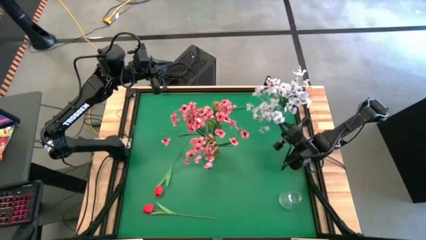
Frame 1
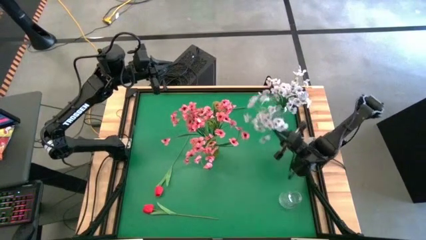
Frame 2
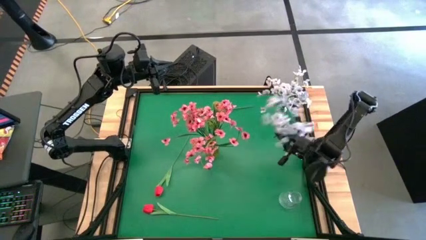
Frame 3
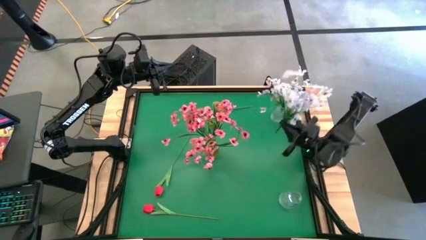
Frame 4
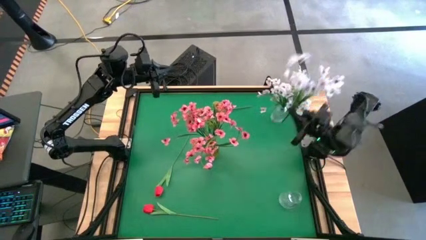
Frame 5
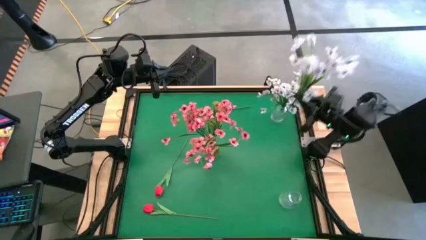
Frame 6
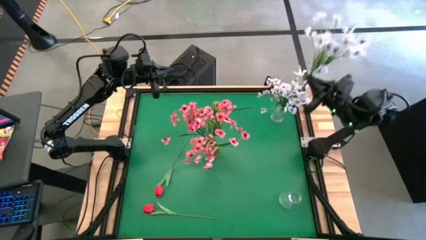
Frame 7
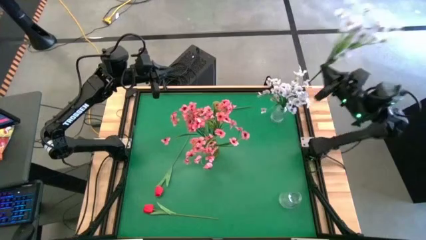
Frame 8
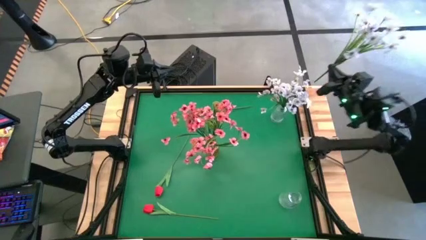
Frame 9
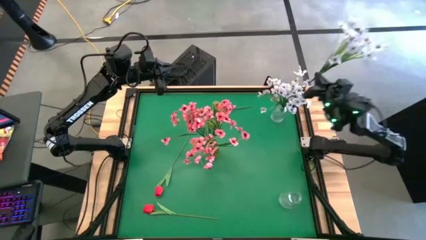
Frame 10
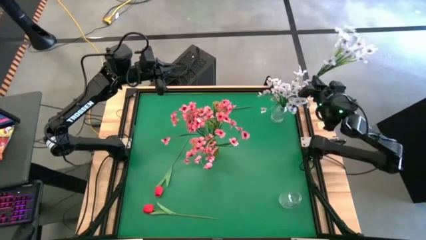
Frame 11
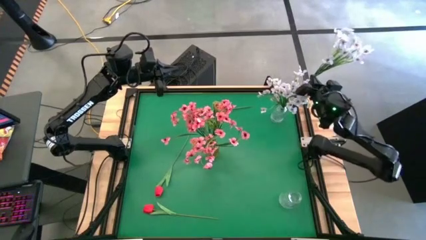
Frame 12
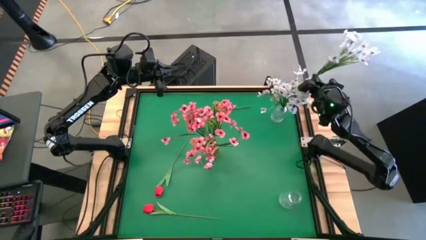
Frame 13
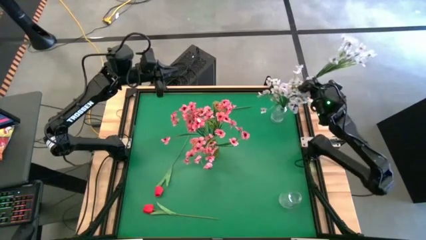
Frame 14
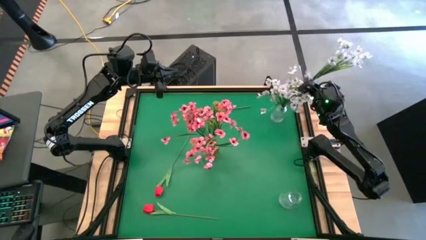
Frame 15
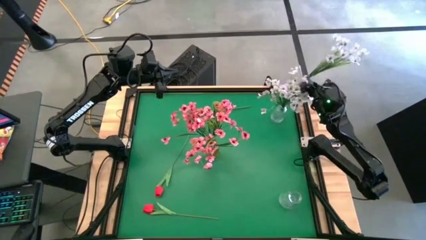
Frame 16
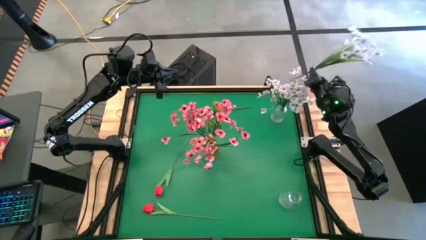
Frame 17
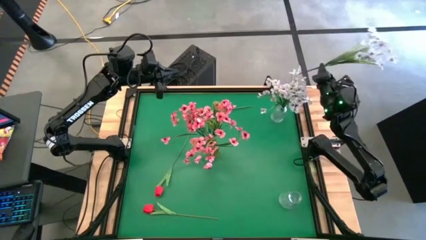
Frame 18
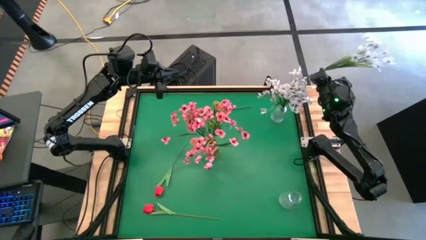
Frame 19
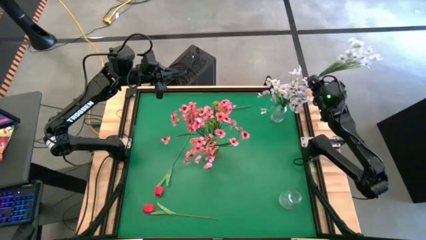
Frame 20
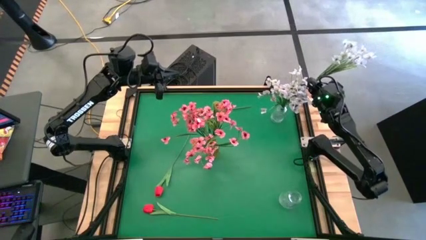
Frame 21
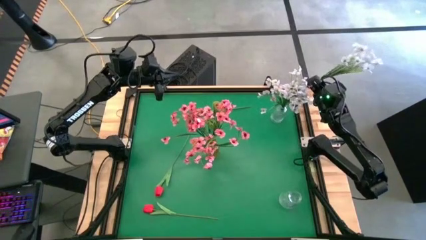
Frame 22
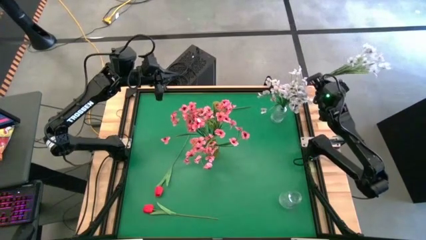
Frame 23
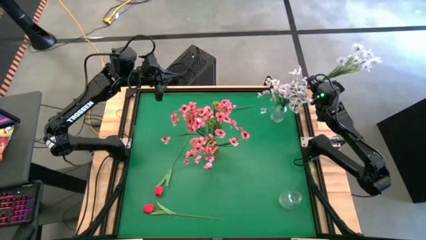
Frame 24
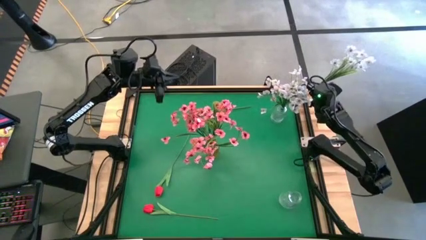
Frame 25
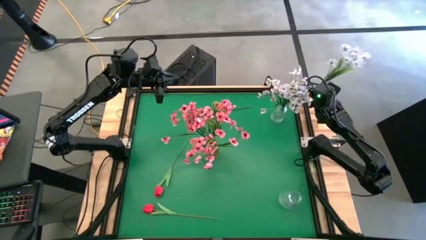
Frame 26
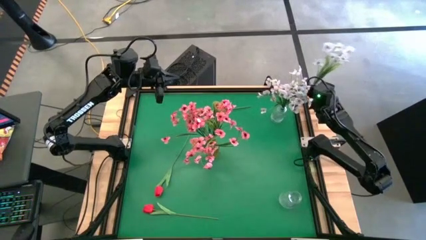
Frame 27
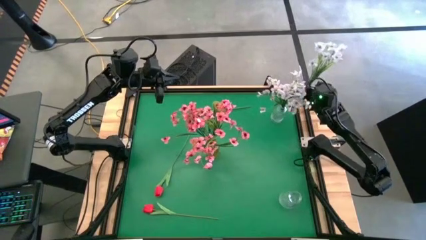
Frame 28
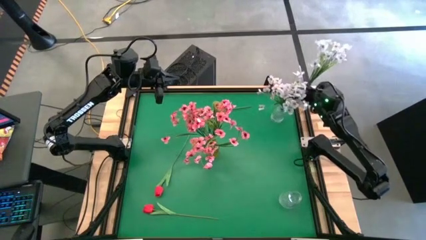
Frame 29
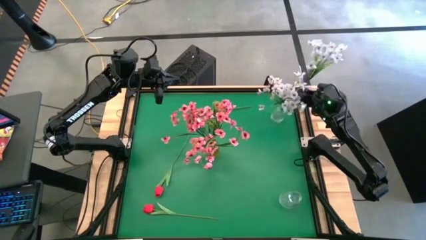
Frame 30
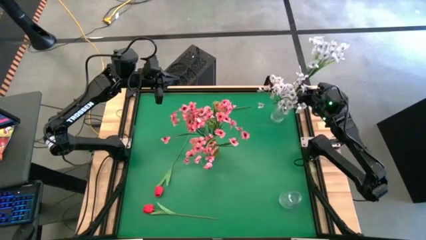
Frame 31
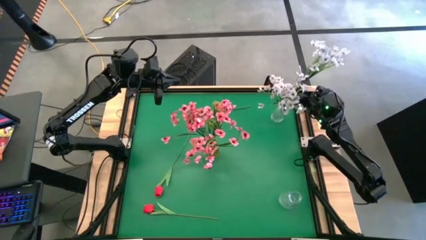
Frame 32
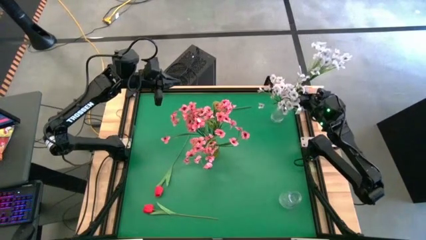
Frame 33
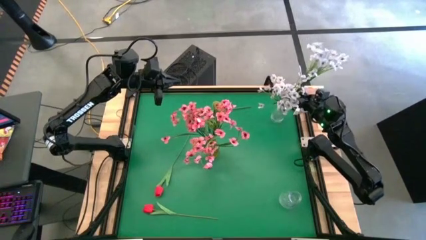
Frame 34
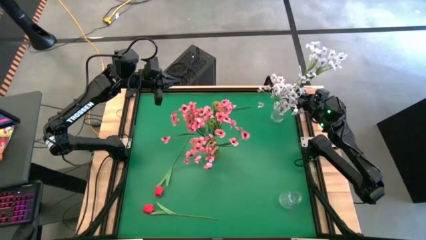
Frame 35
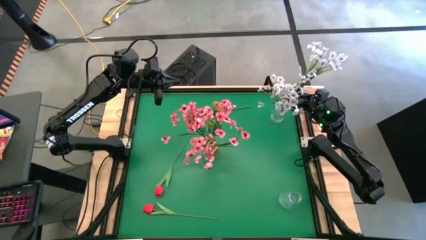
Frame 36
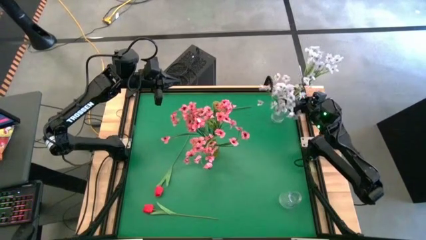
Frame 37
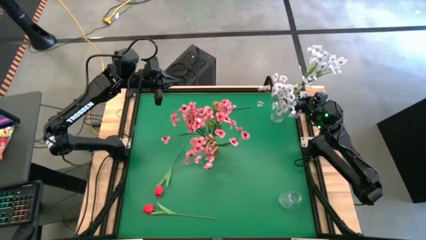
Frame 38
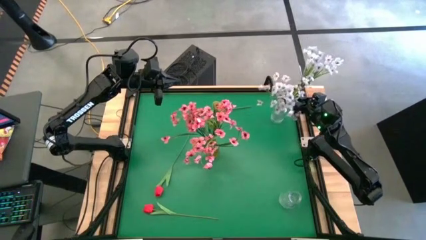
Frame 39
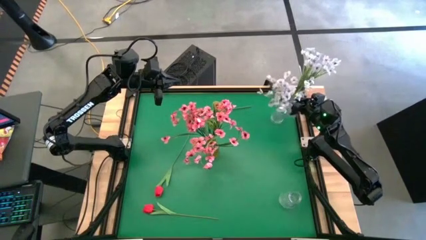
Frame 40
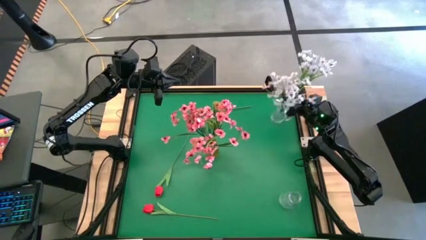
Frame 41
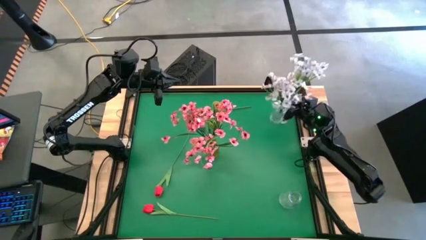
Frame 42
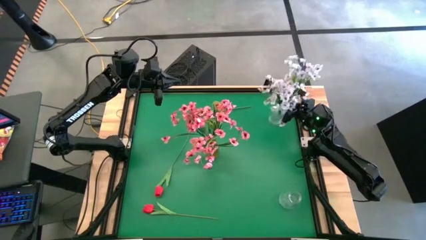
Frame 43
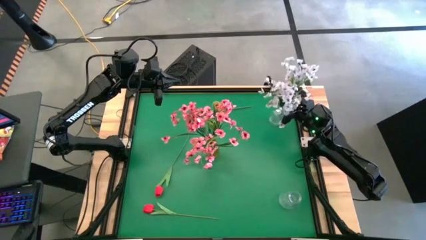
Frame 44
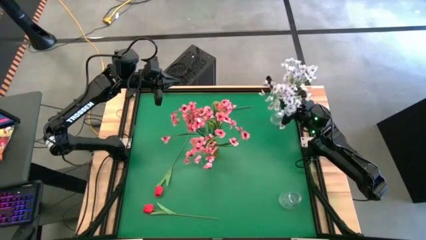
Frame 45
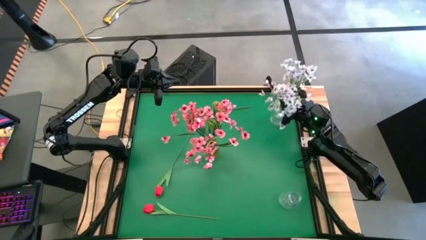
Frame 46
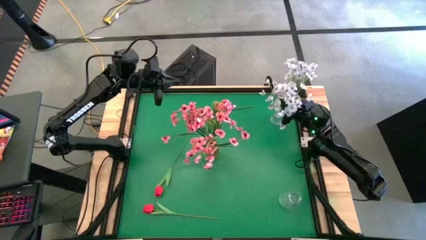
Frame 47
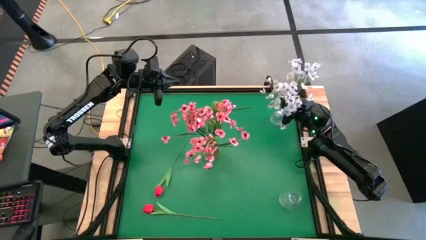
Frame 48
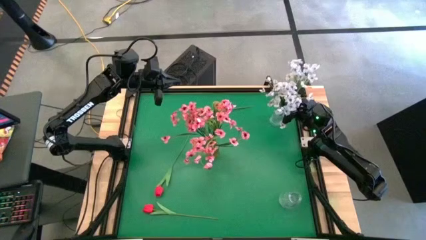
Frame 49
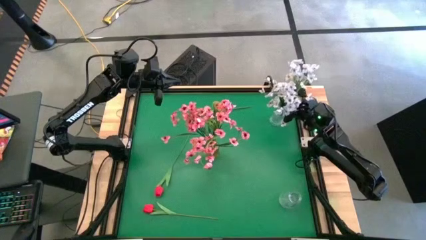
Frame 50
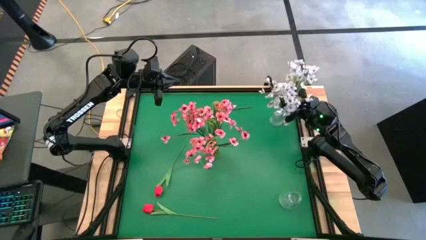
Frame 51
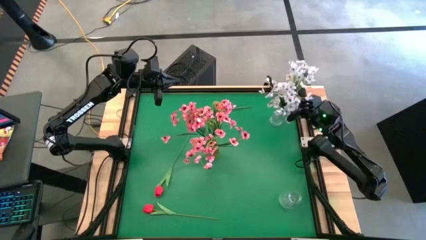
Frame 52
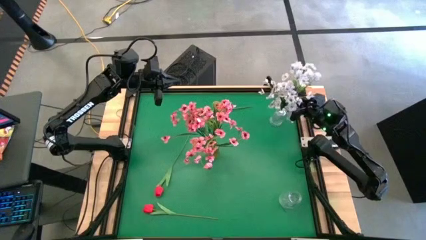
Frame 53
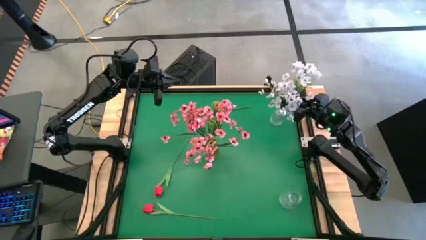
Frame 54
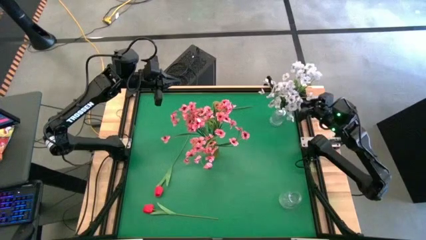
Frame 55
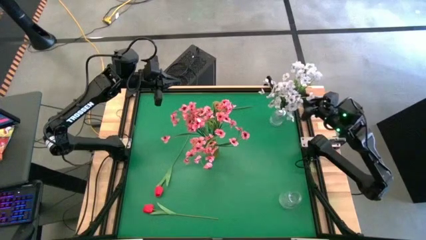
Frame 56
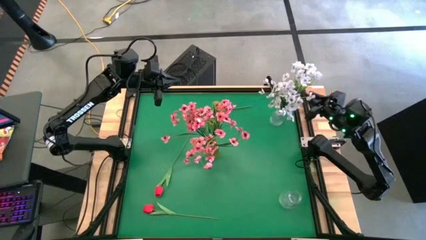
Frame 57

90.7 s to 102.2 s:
Task: Sort flowers into vase by color
Put the white flowers into the top transparent vase

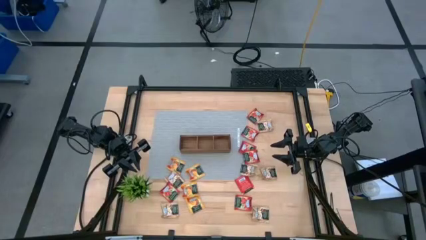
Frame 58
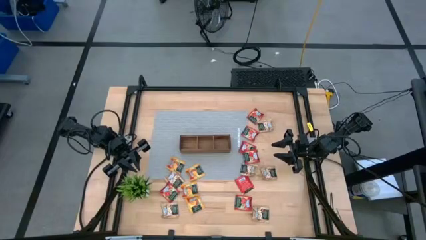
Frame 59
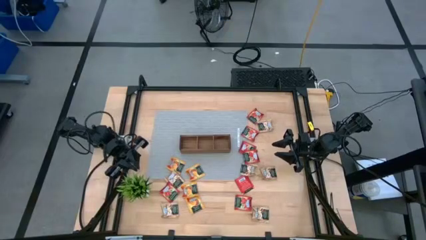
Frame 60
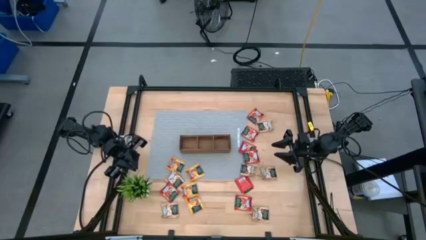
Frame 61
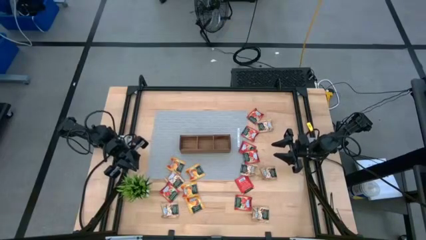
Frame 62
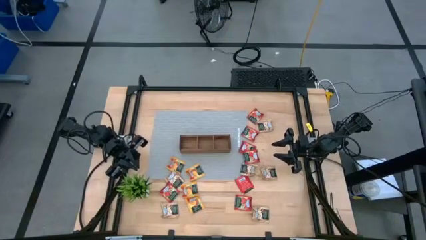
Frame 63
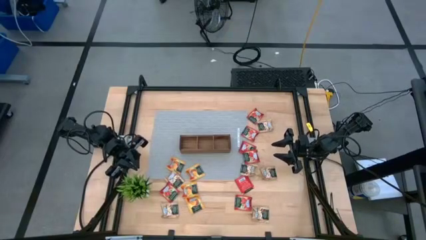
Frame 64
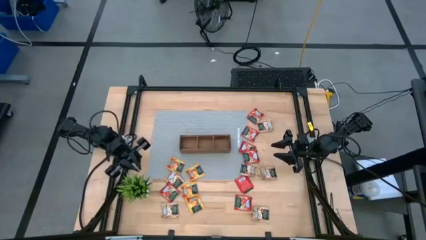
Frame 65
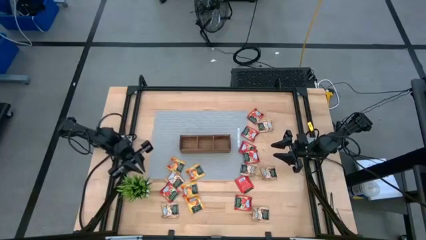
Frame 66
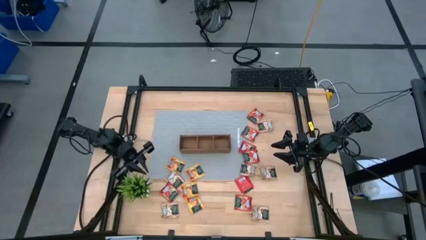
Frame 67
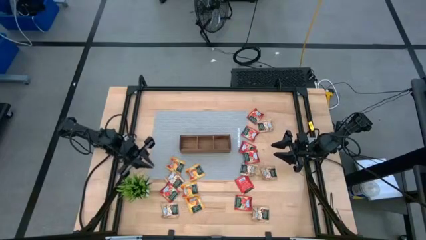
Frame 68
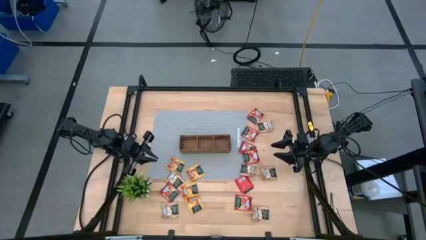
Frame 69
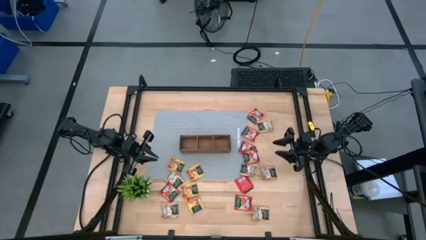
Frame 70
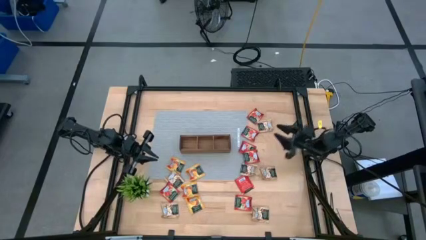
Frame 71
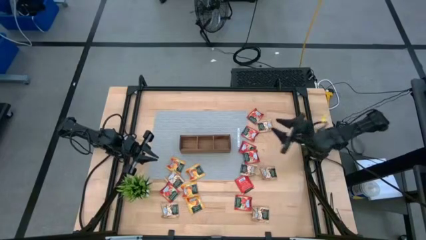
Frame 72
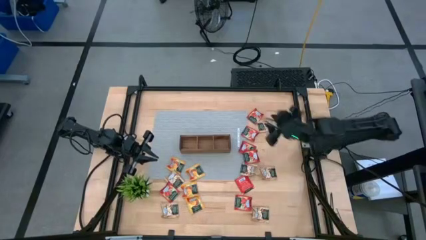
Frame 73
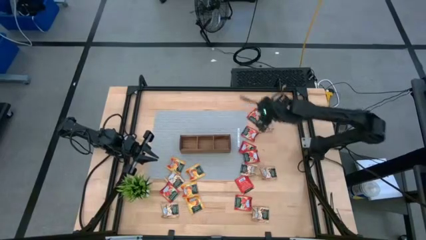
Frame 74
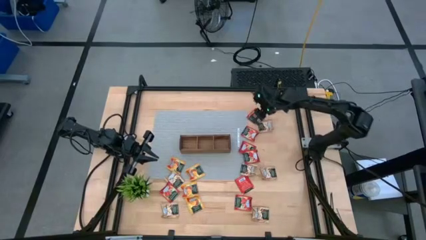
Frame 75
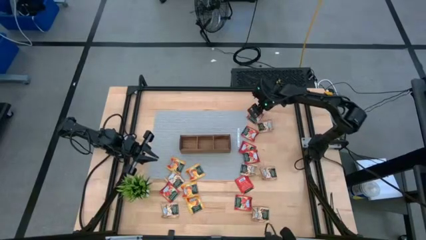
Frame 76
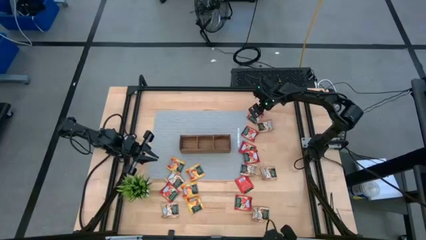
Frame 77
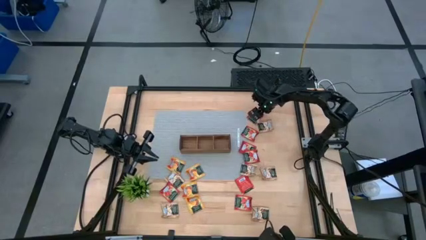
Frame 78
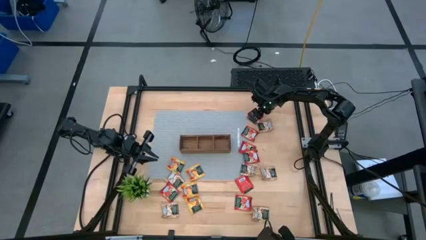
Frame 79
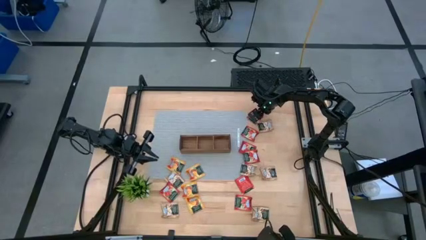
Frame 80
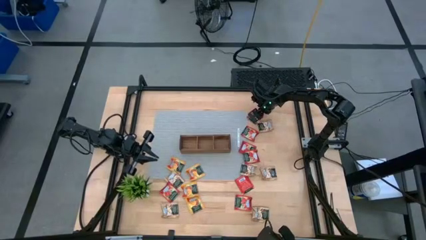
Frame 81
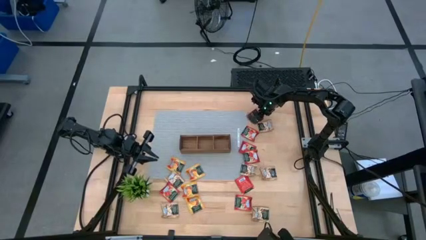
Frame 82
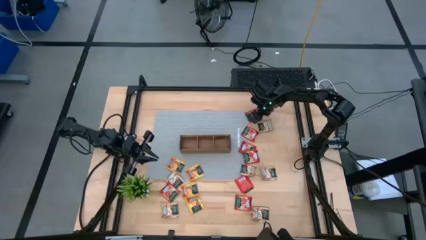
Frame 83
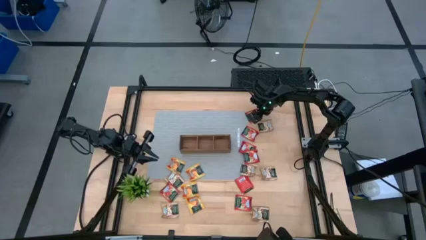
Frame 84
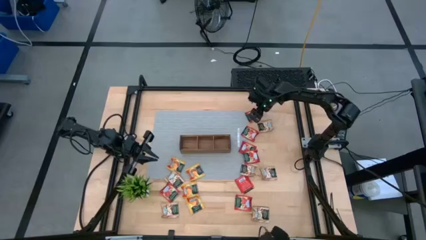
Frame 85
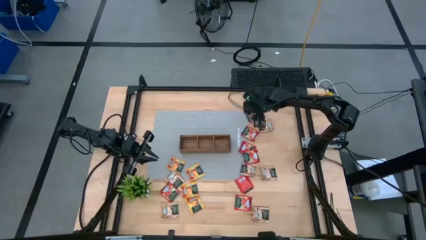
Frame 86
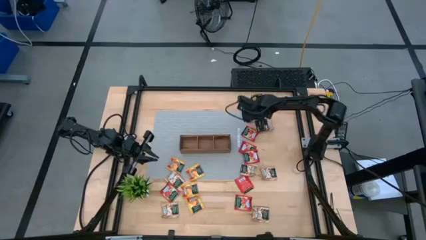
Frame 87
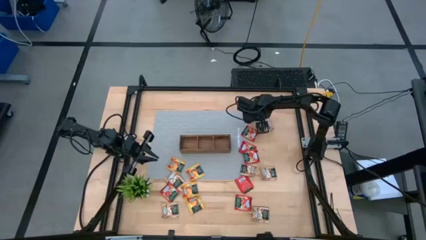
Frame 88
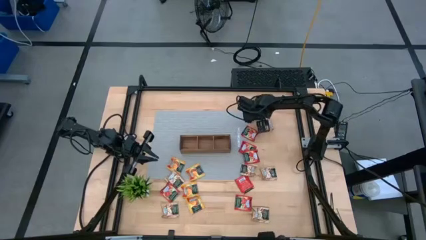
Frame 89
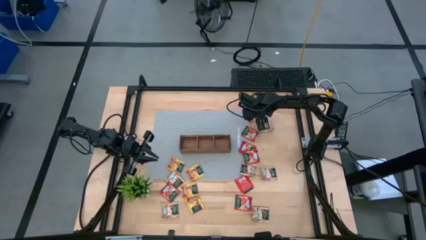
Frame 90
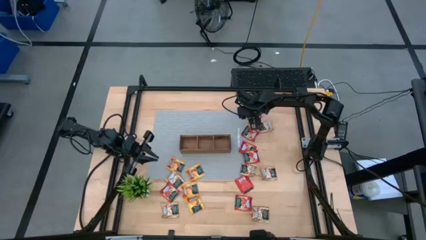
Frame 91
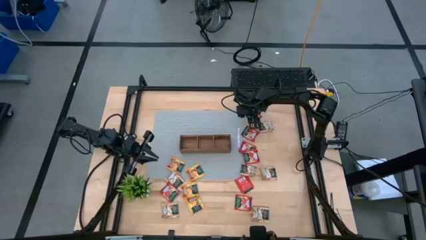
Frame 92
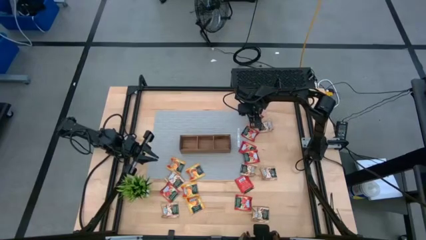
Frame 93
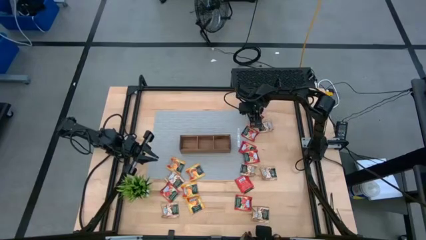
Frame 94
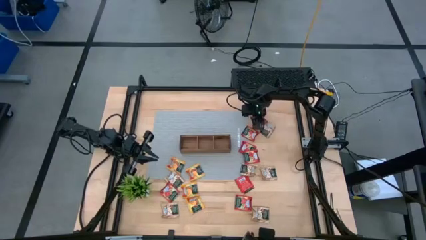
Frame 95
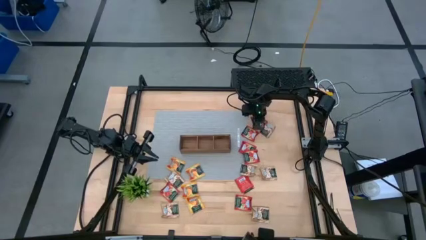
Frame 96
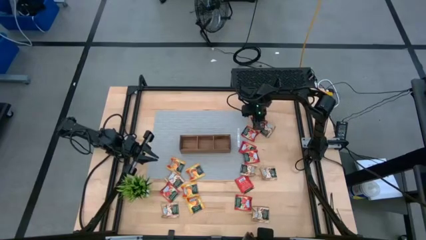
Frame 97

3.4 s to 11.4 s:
Task: Pick & Place Tea
Put the red tea bag into the wooden organizer
